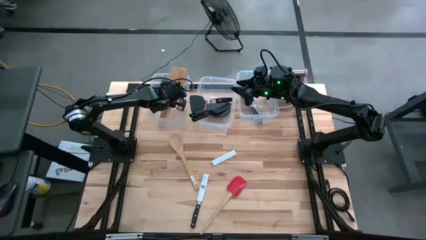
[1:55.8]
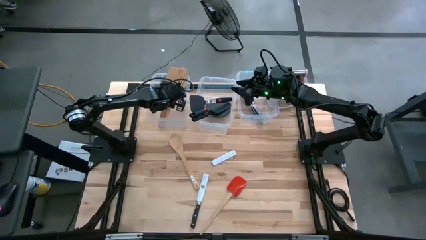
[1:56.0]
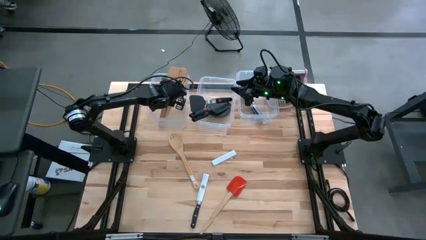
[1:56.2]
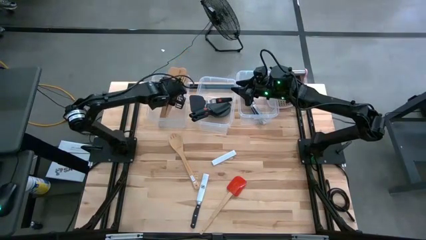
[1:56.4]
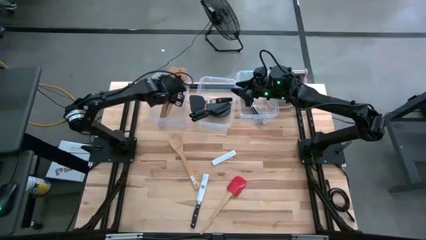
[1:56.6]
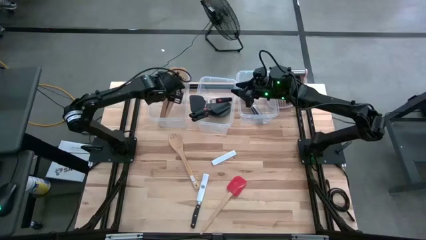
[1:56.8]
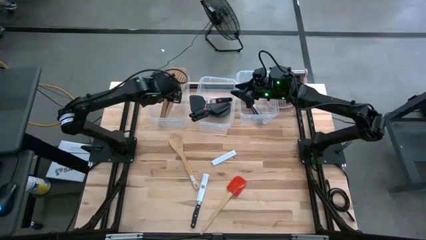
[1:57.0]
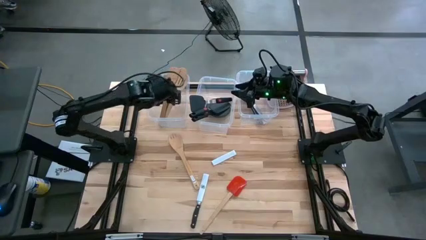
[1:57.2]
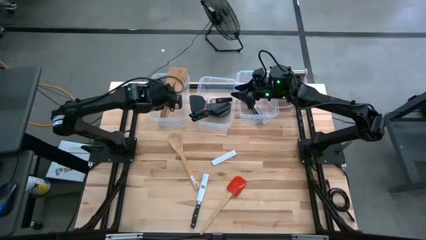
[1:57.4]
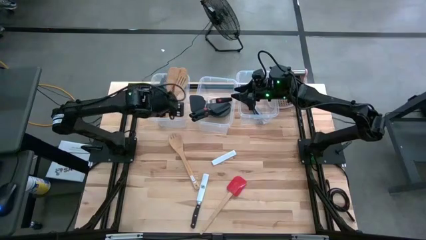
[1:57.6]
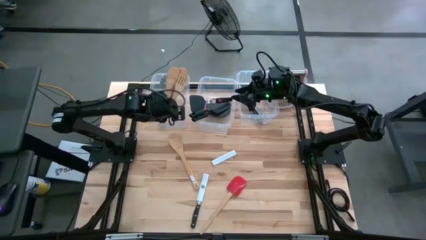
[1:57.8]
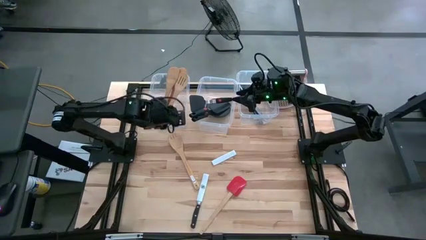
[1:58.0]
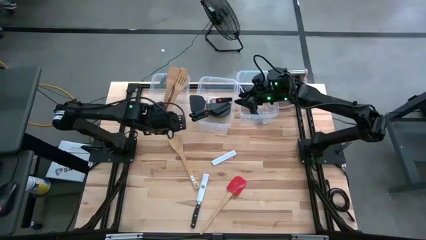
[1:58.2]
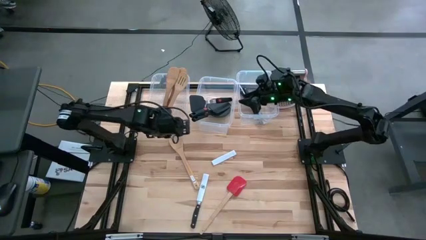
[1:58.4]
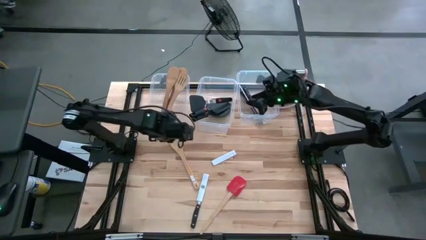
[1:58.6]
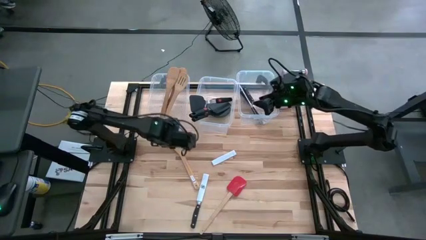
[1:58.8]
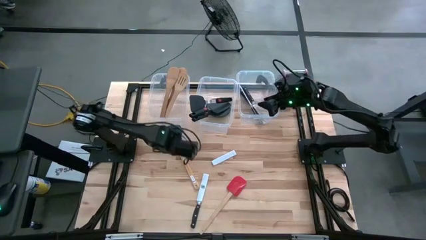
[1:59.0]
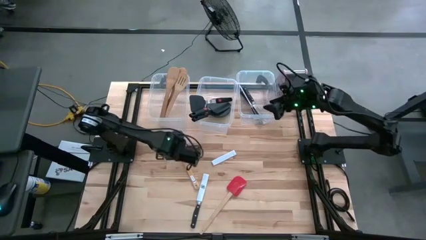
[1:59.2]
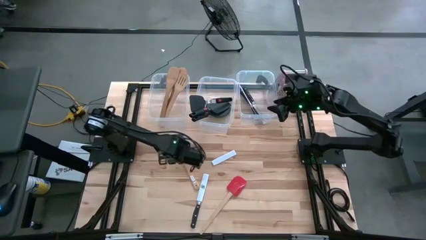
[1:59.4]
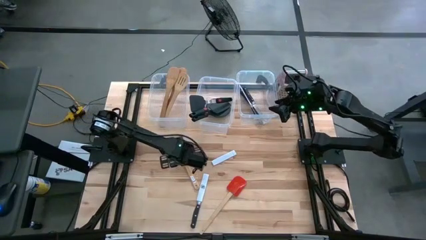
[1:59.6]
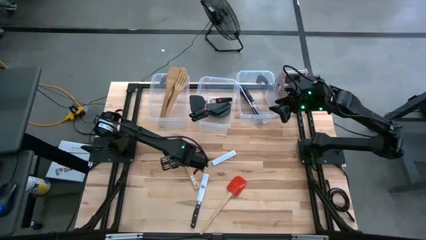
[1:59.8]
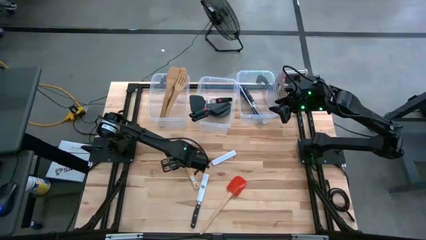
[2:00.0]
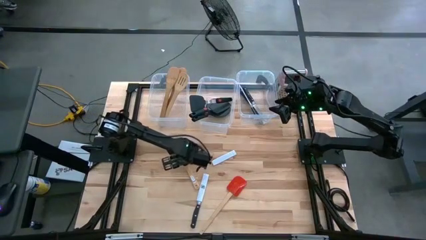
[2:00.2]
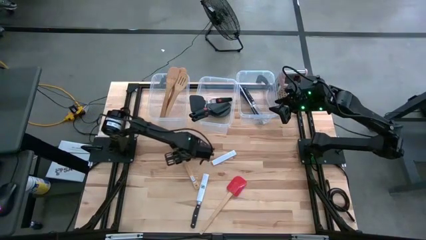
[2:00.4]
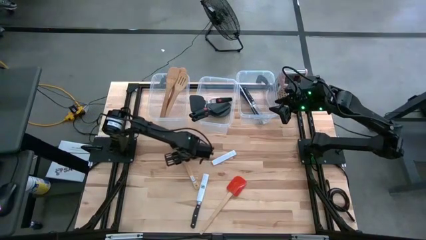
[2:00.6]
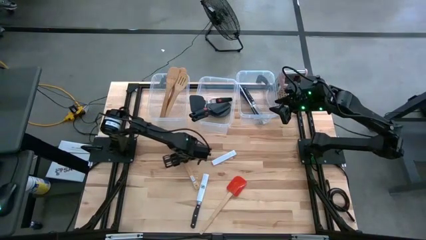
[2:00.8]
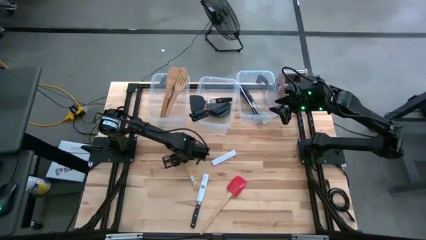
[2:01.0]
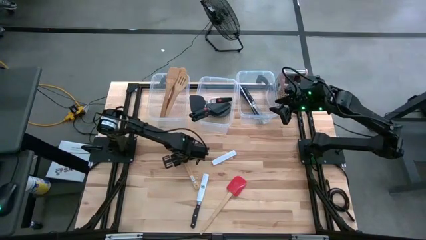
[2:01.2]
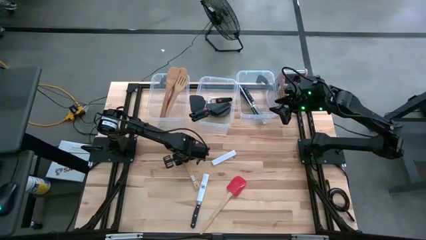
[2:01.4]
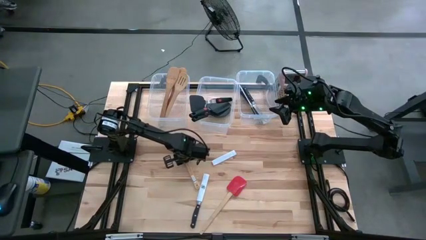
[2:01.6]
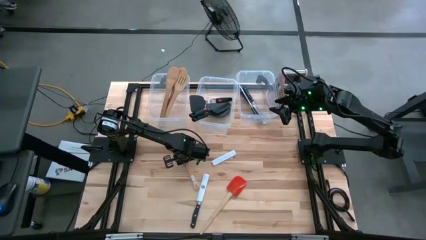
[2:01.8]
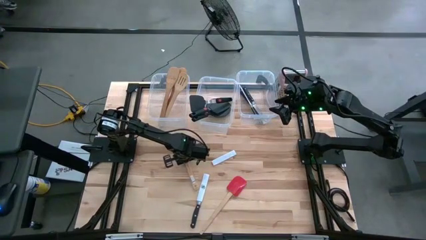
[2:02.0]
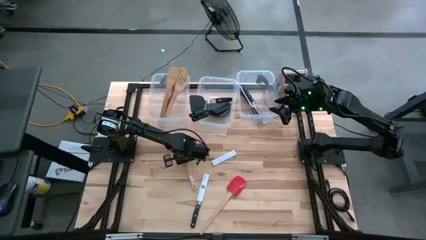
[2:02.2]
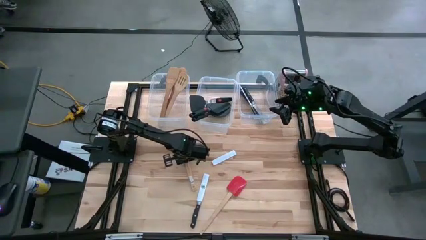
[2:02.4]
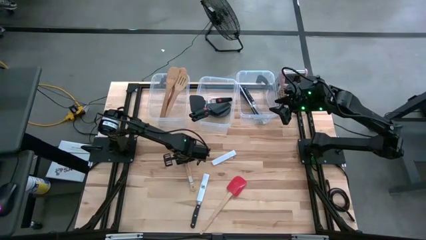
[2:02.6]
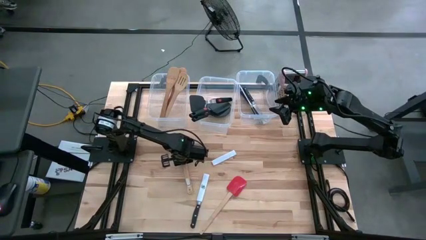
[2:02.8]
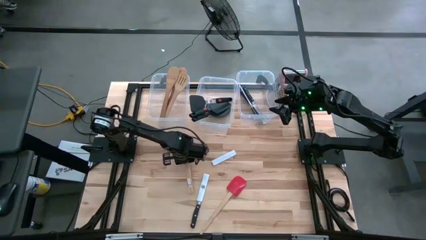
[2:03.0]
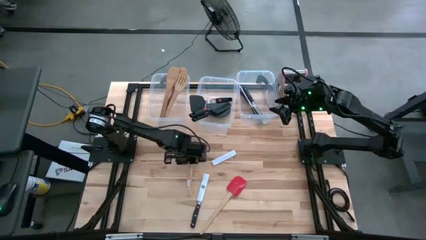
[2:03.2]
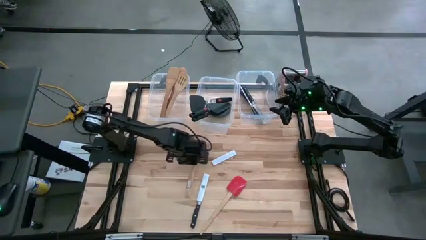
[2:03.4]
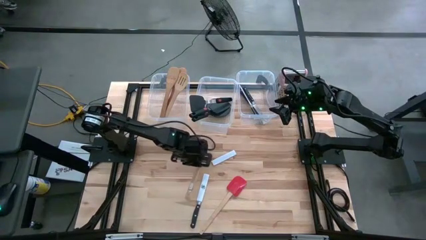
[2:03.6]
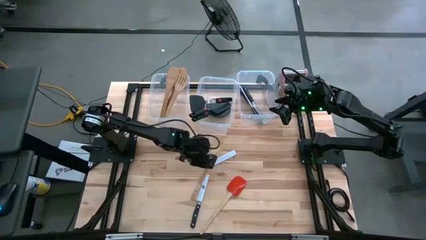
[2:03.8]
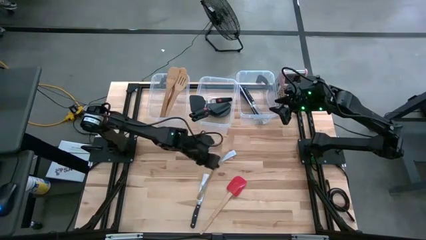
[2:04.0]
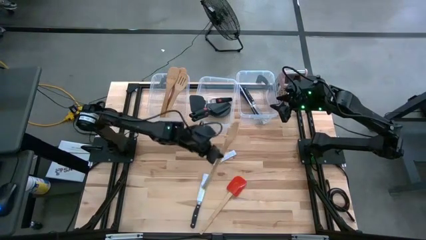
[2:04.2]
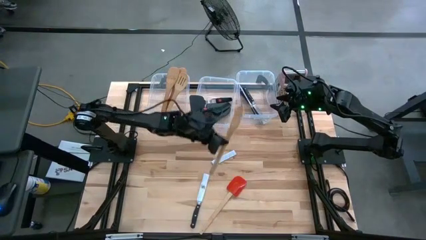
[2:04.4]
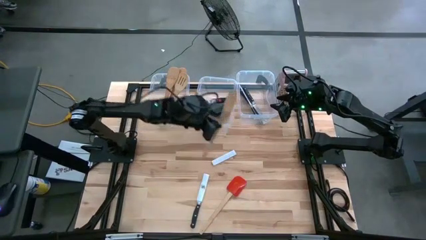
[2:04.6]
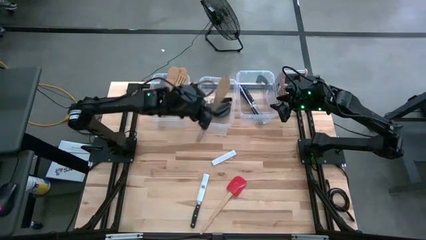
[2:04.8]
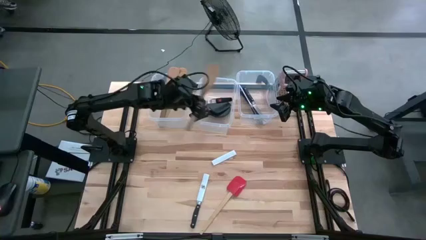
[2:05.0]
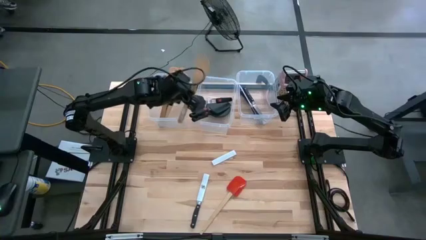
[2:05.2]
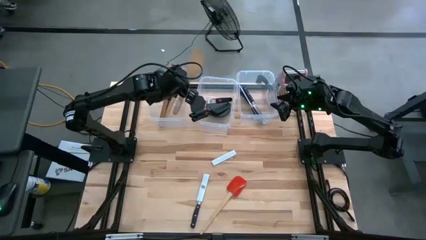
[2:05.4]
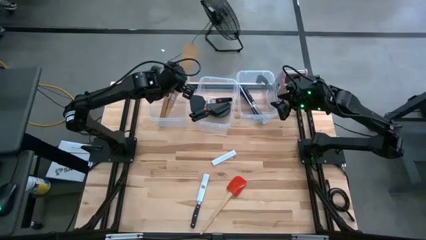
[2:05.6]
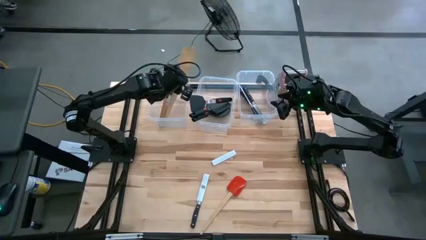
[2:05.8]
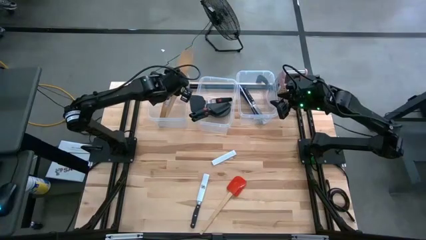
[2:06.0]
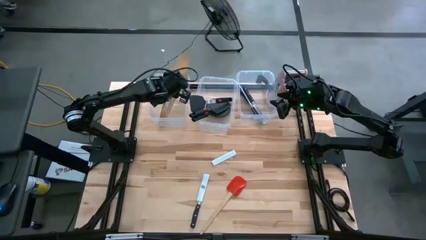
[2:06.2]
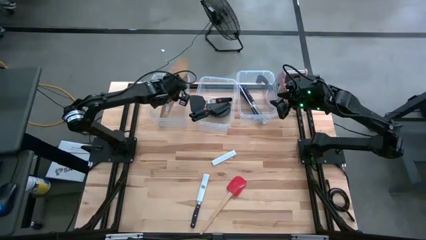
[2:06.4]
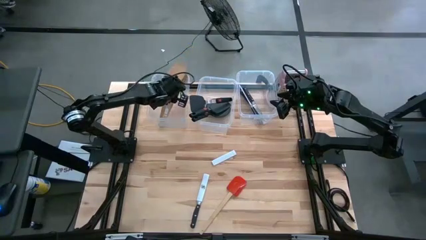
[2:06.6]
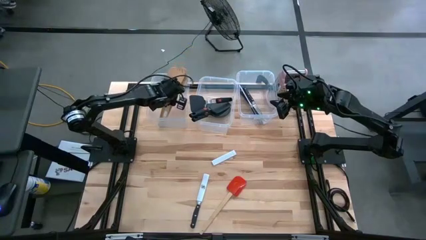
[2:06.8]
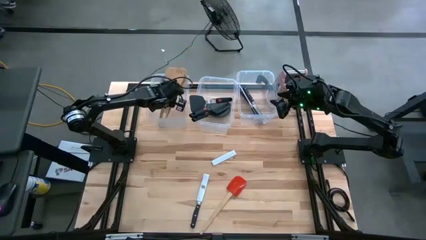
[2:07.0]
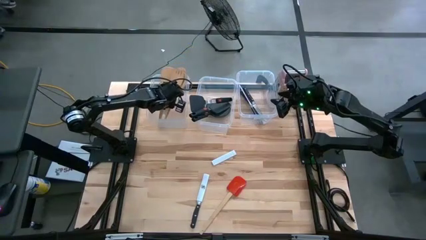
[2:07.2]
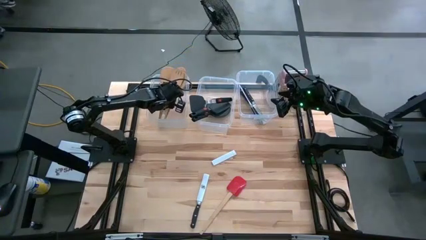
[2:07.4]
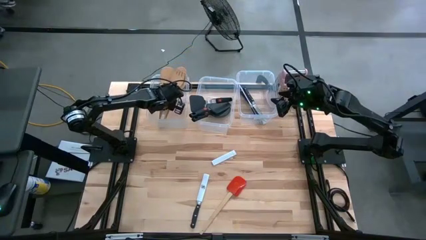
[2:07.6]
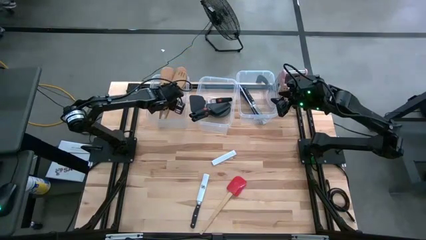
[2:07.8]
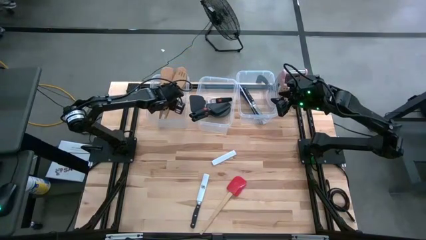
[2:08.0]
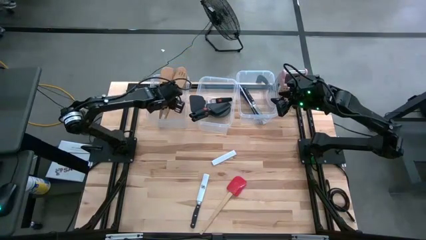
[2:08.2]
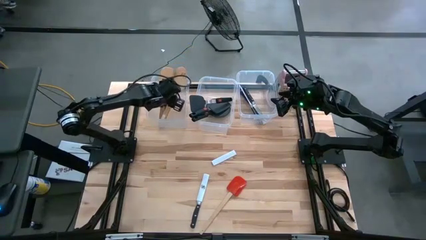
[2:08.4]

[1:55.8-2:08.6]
Task: Pick & Place Kitchen Items
Put the wooden serving spoon into the left bin
